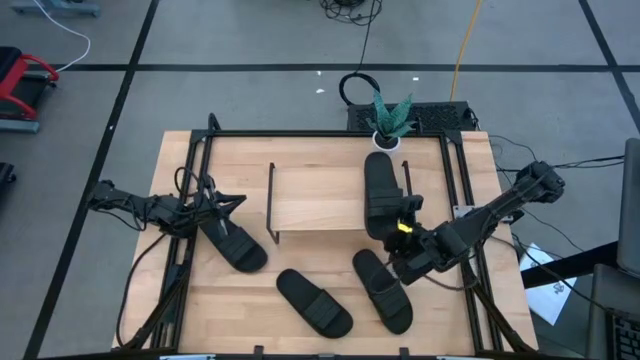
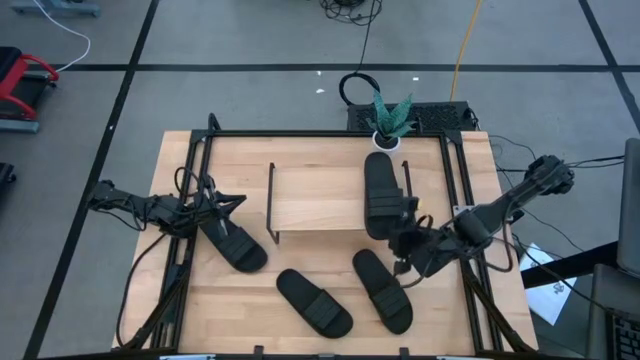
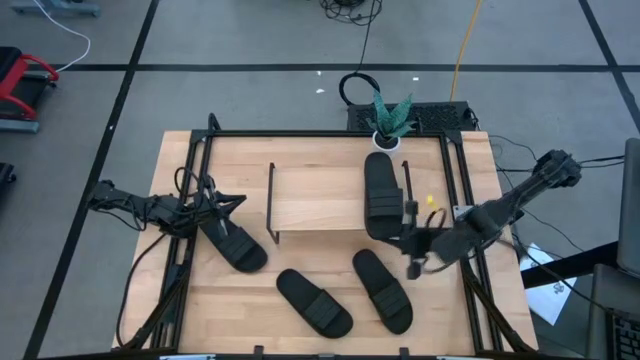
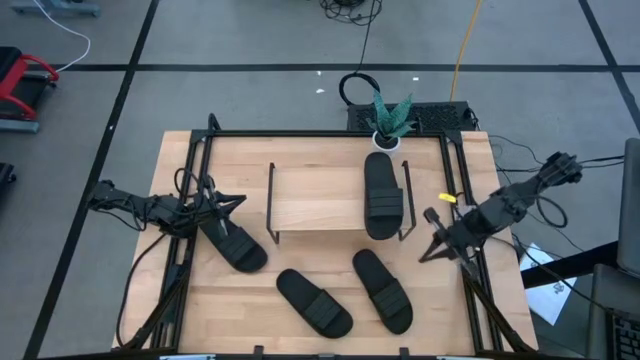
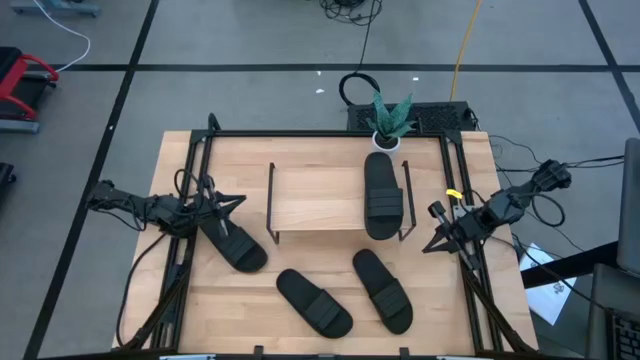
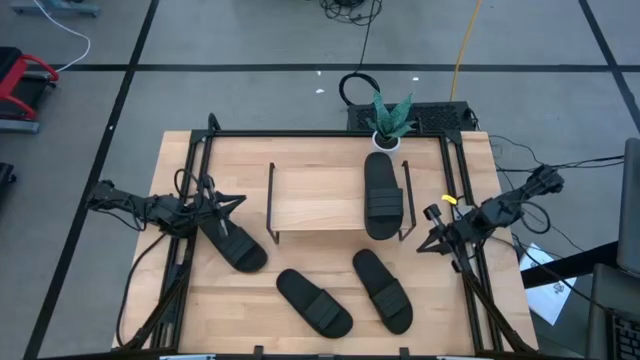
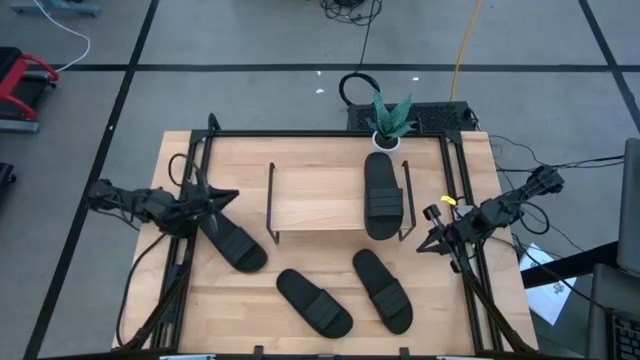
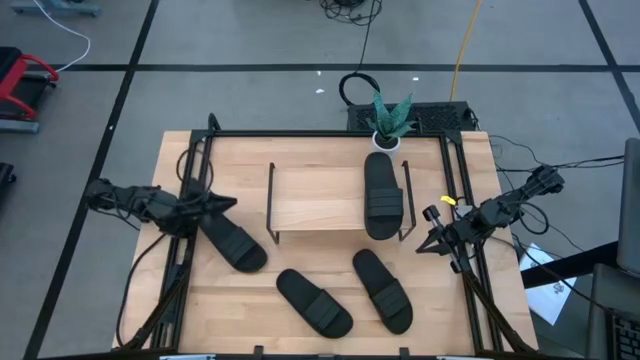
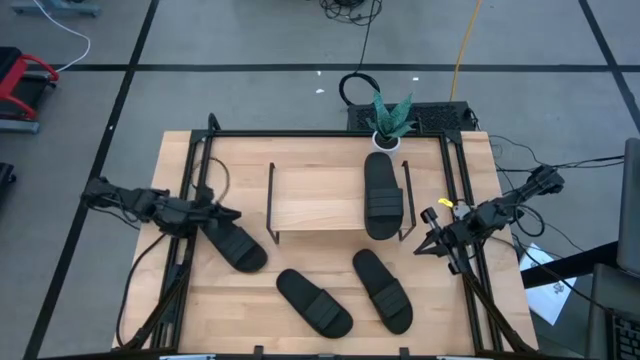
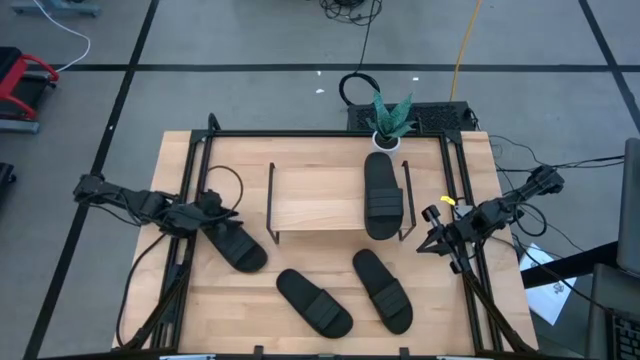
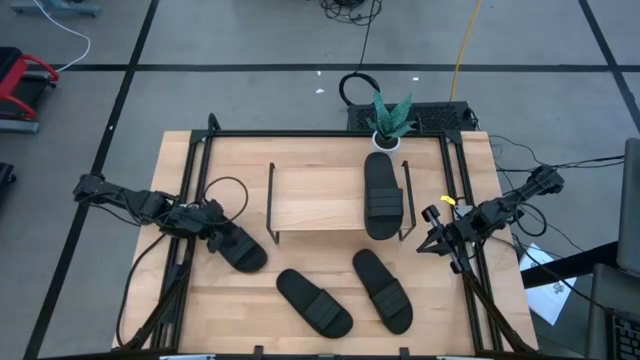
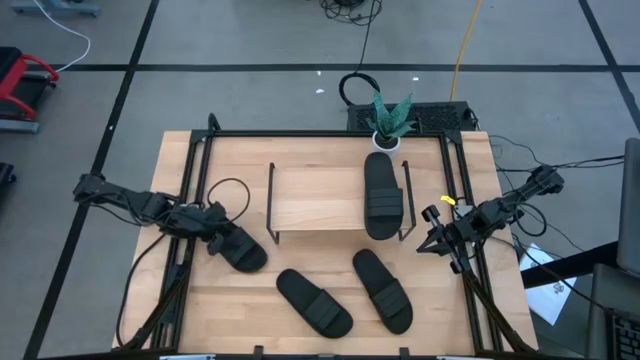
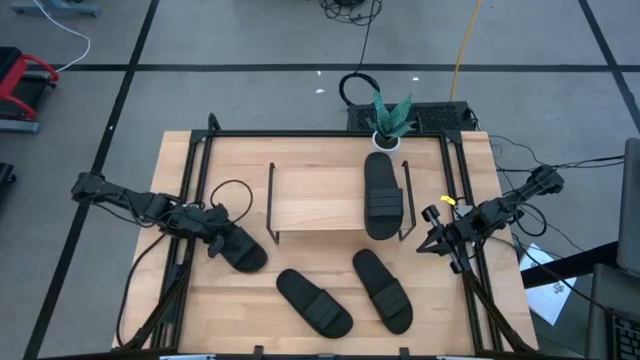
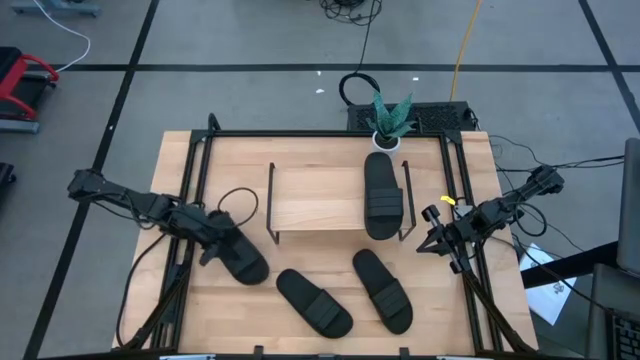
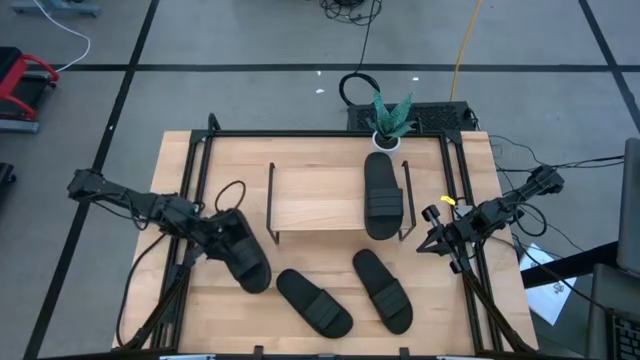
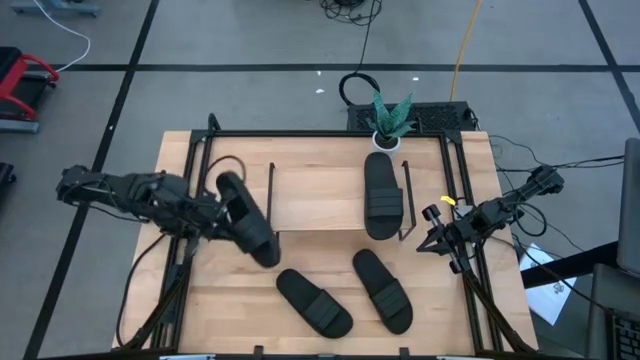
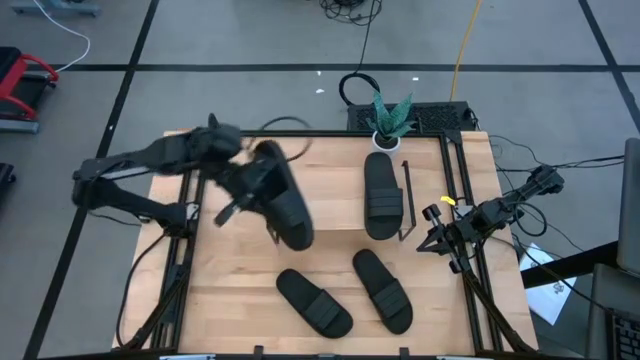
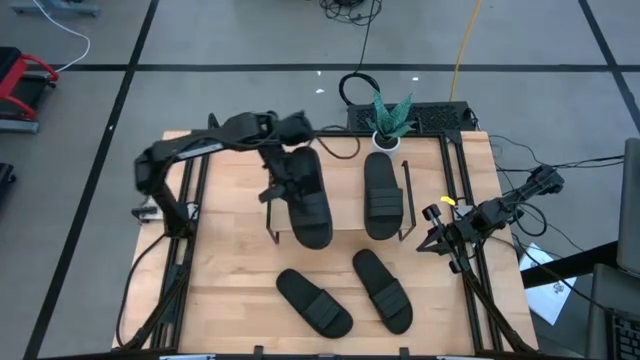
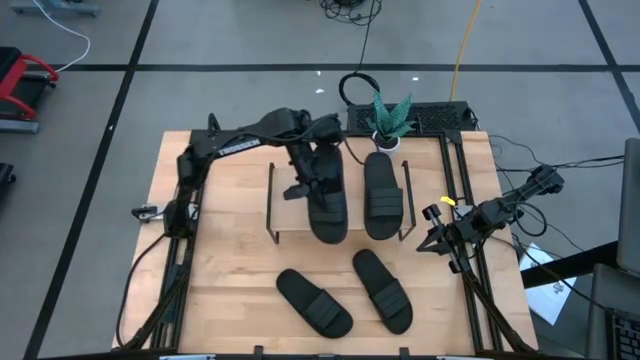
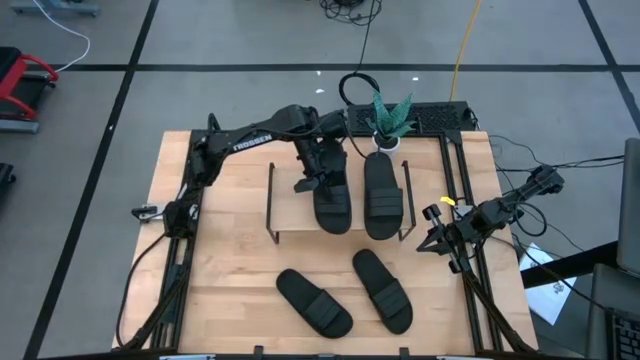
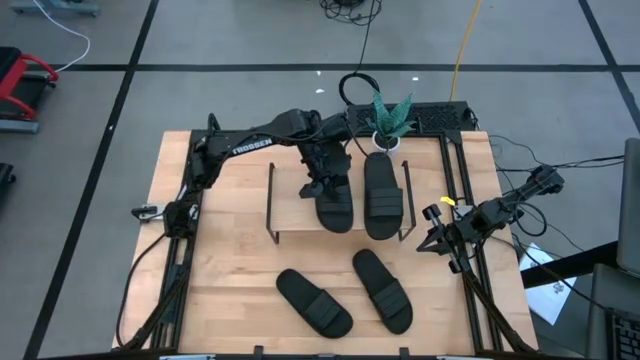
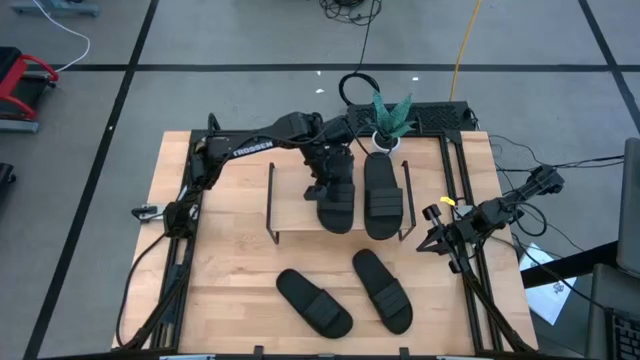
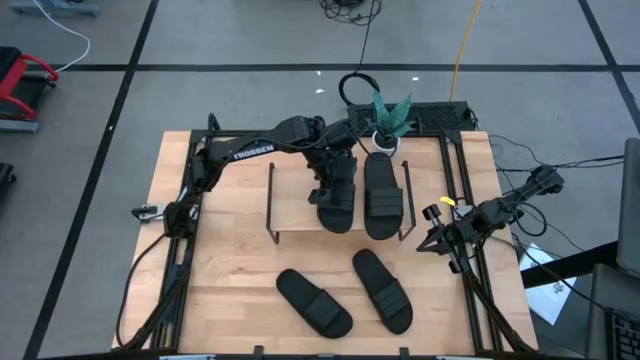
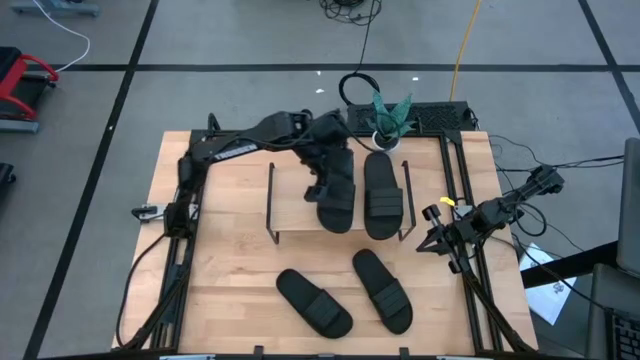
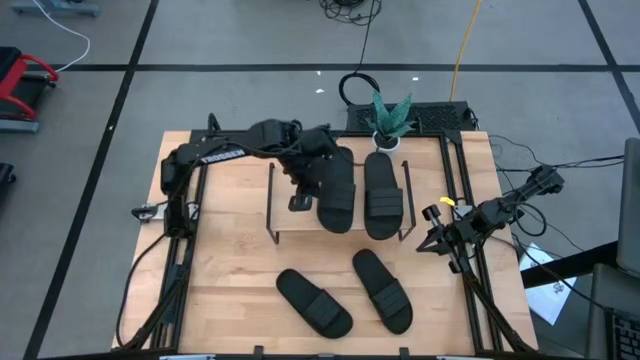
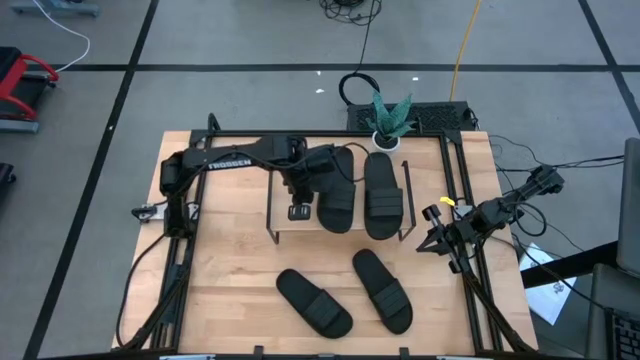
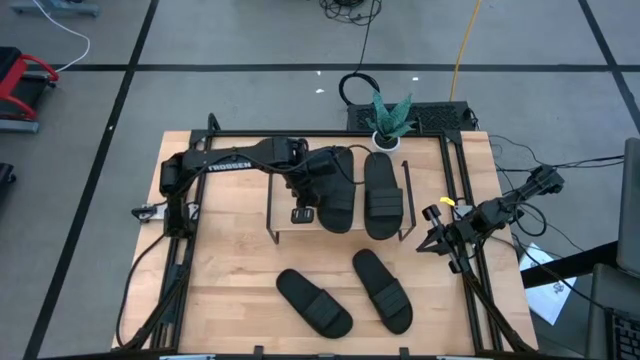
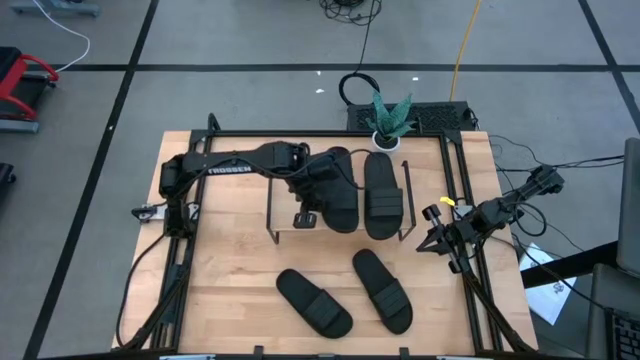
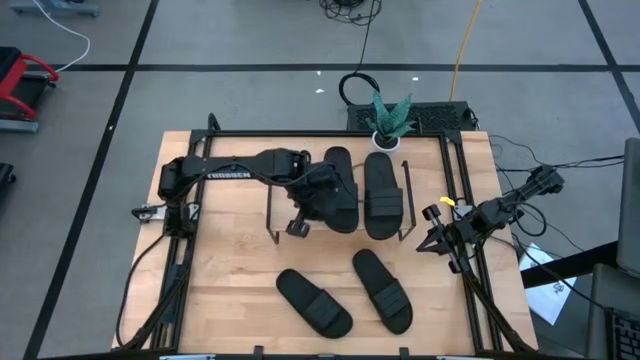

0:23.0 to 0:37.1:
Task: Pick and place slides into the shelf
Put the black slipper on the shelf

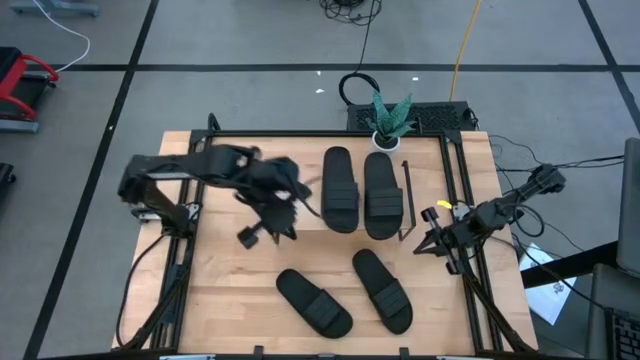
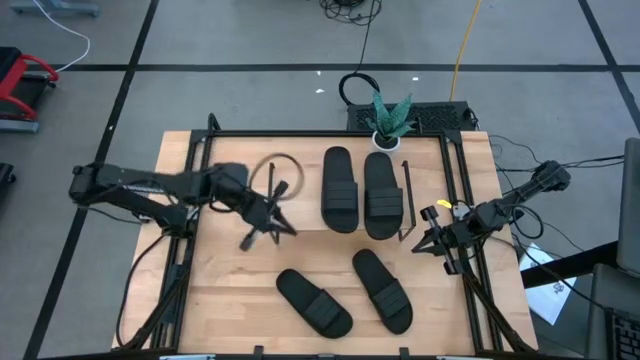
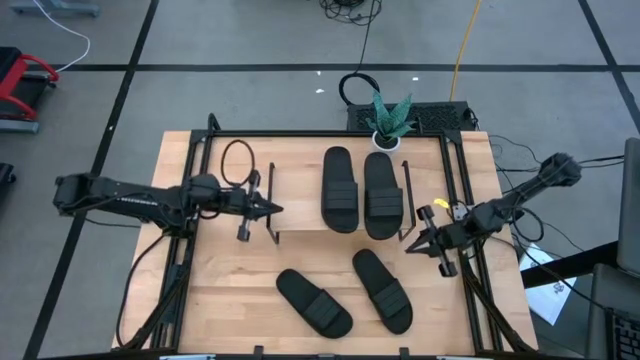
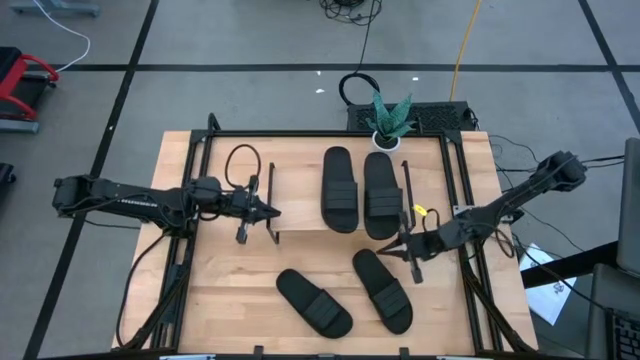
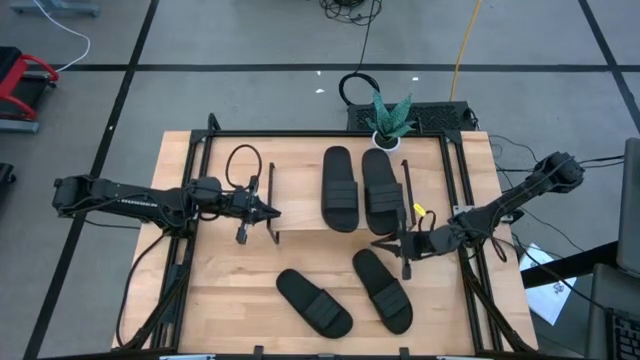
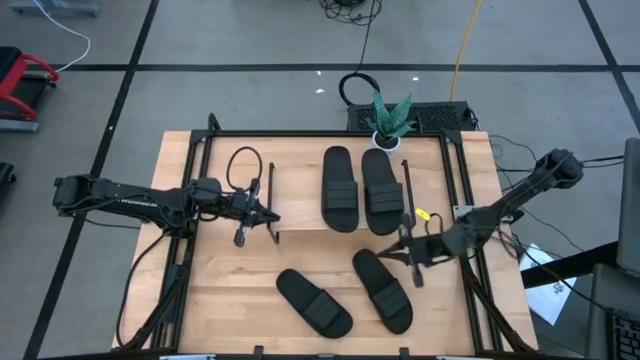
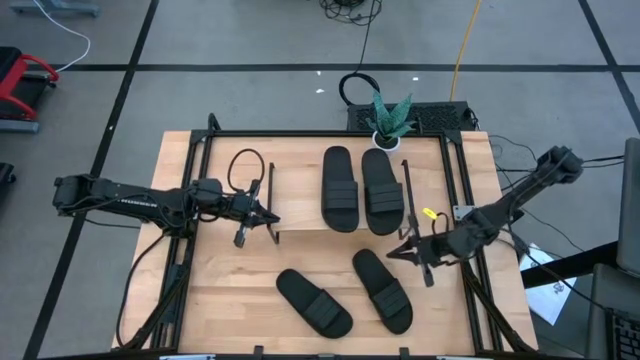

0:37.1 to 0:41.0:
Adjust the black slipper on the shelf

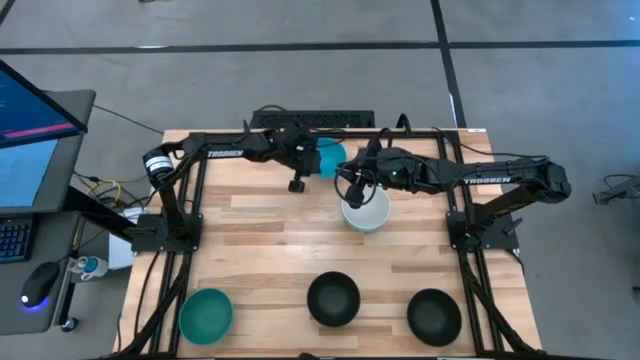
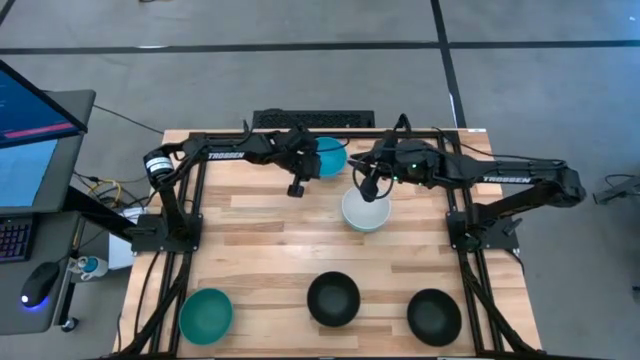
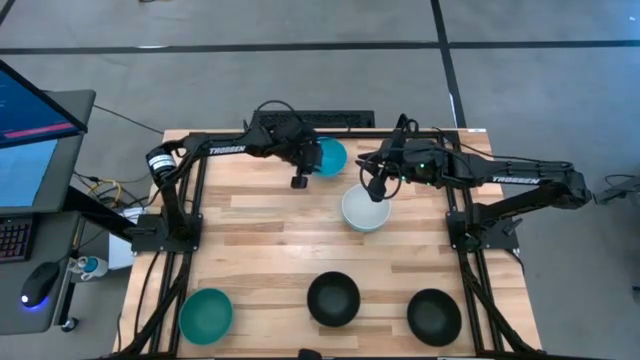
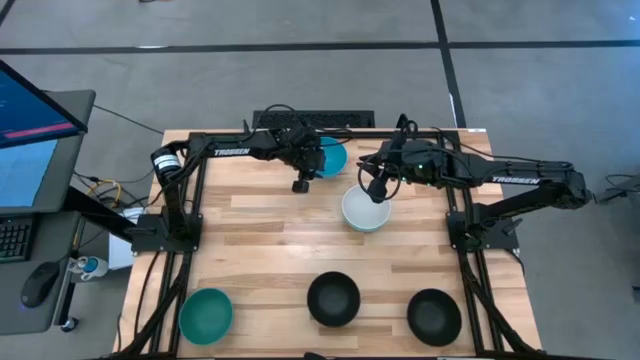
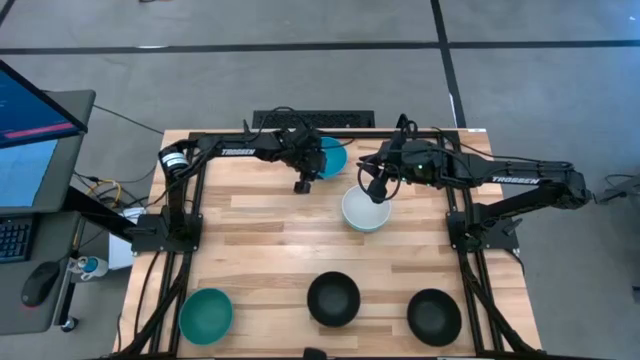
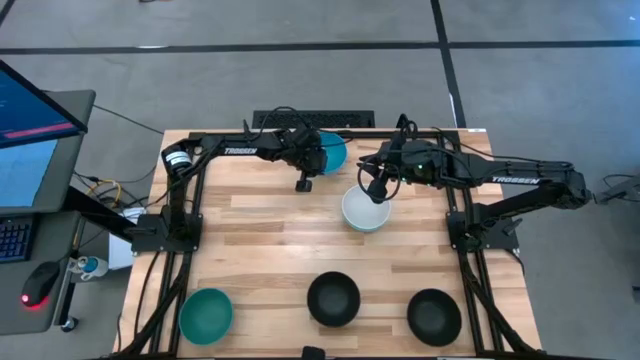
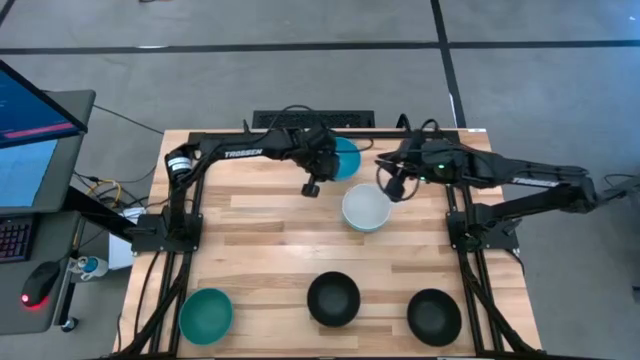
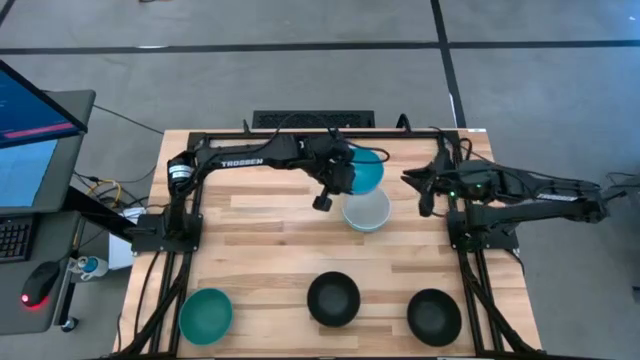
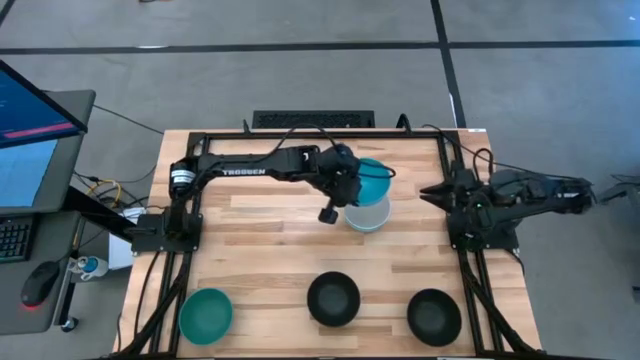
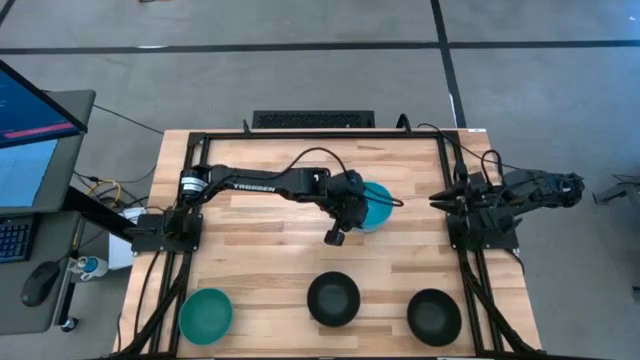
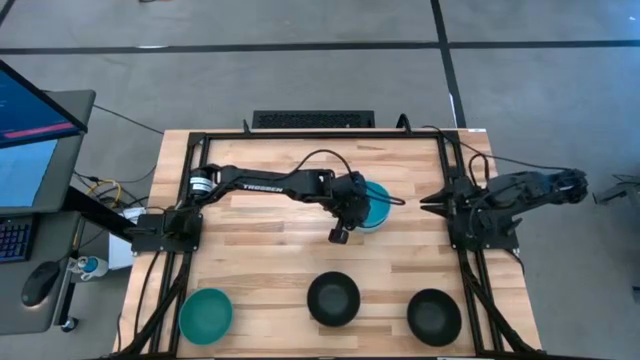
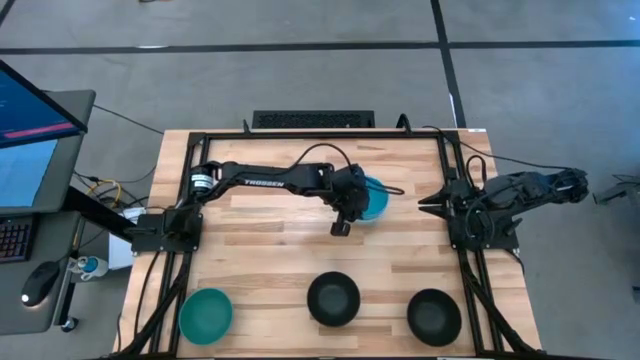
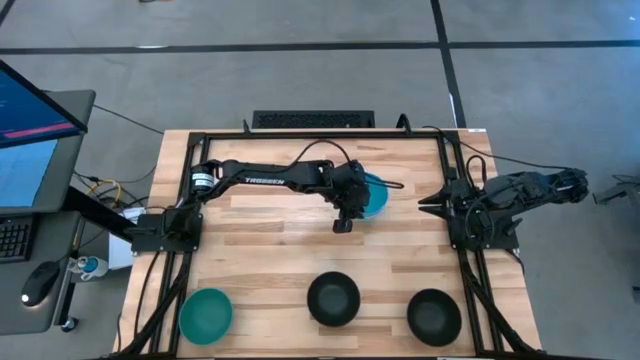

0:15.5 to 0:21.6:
Task: Nest bowls inside each other
Stack the blue bowl on top of the white bowl
